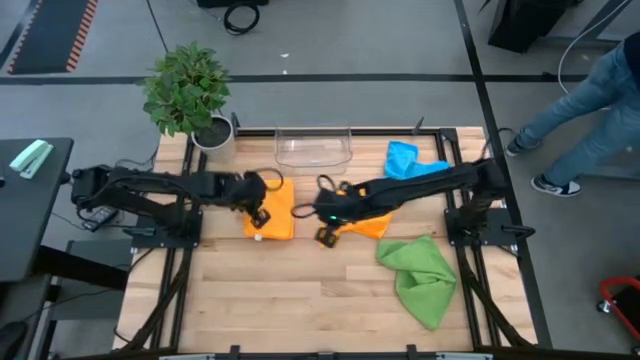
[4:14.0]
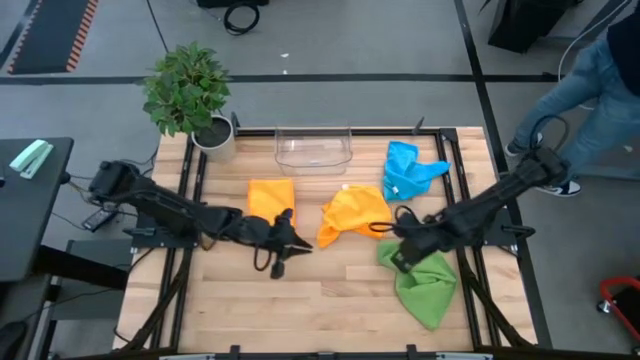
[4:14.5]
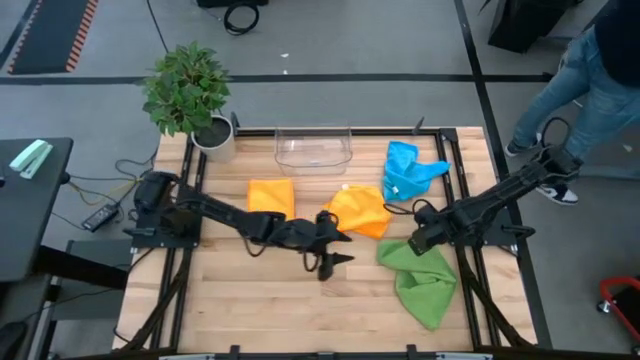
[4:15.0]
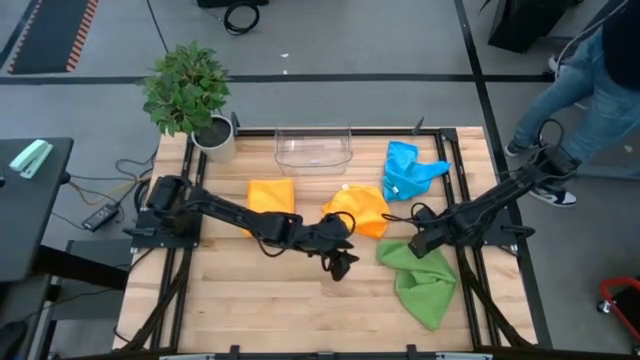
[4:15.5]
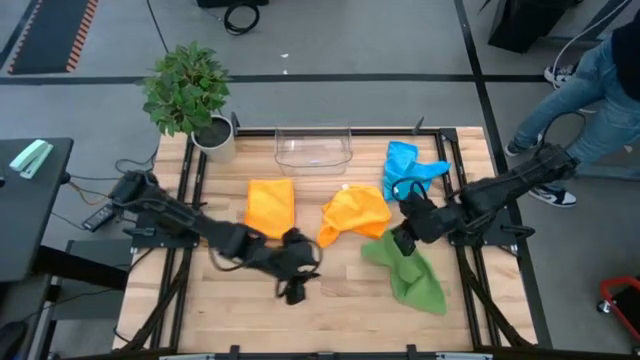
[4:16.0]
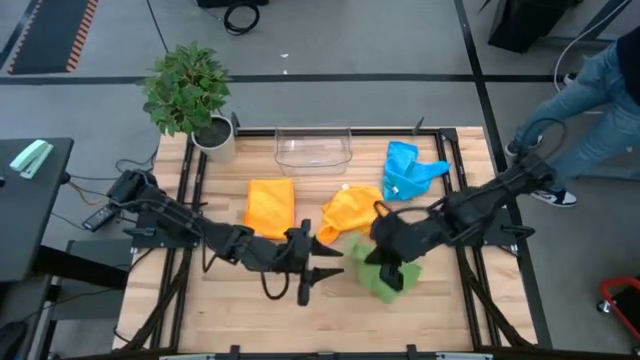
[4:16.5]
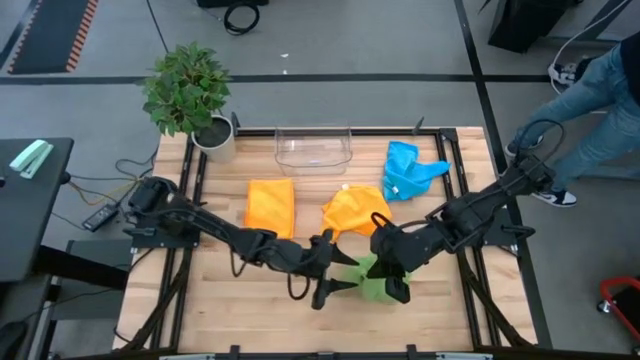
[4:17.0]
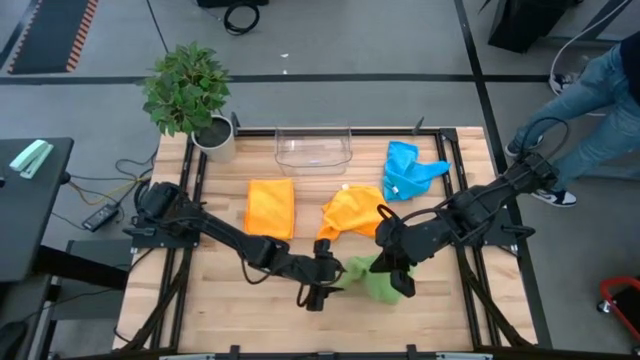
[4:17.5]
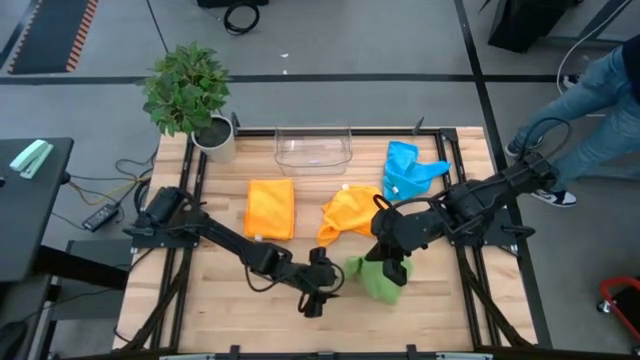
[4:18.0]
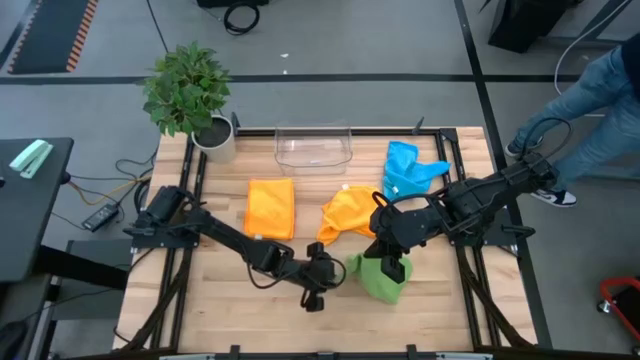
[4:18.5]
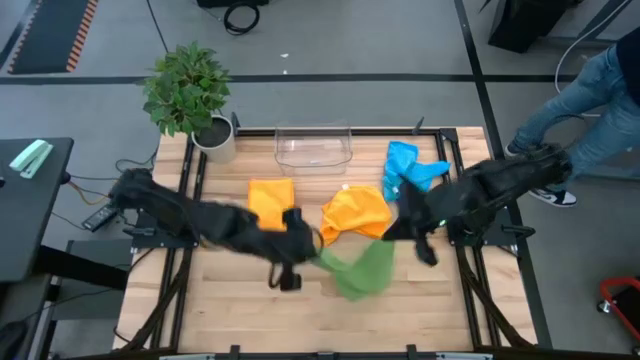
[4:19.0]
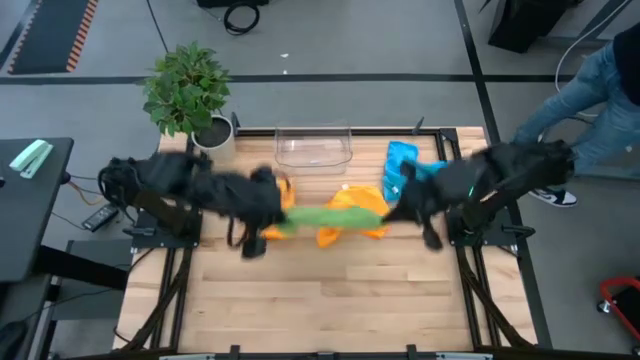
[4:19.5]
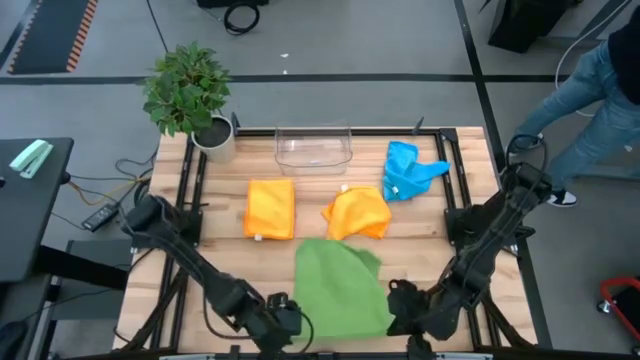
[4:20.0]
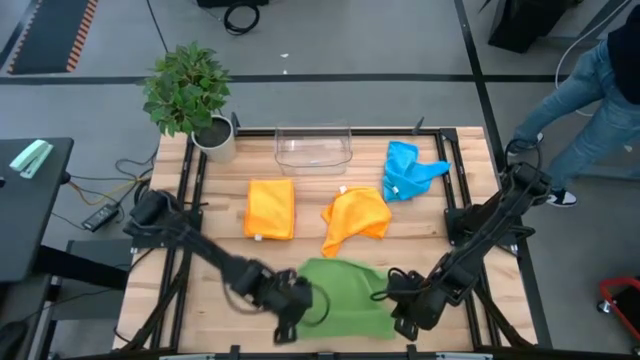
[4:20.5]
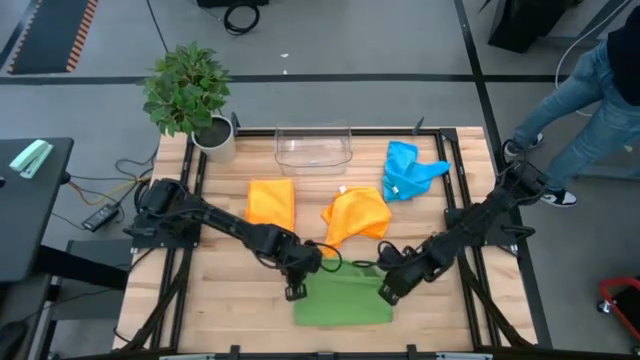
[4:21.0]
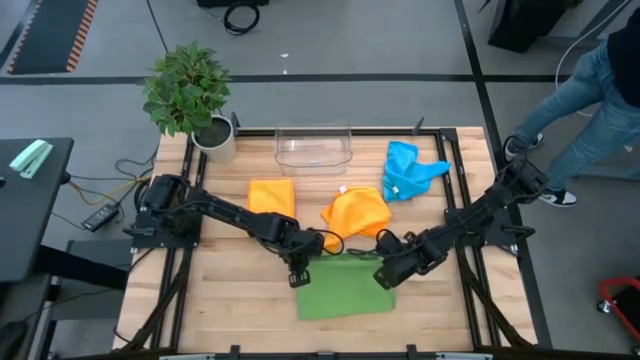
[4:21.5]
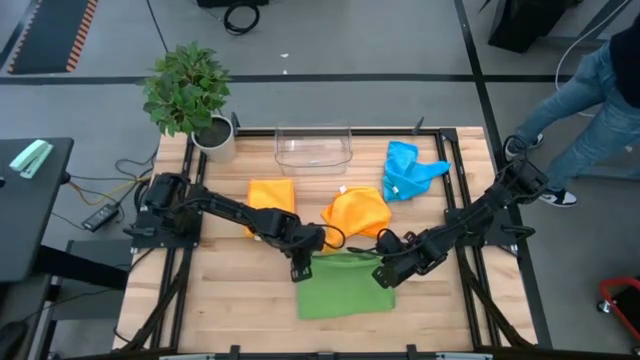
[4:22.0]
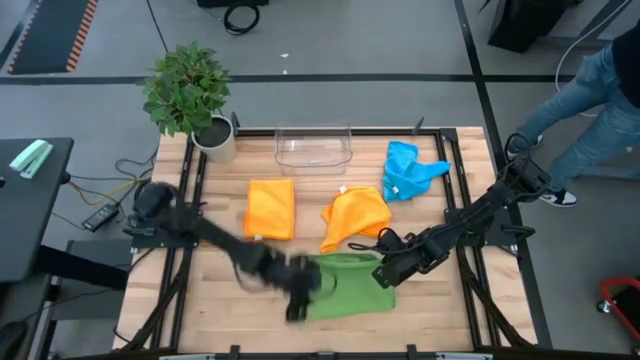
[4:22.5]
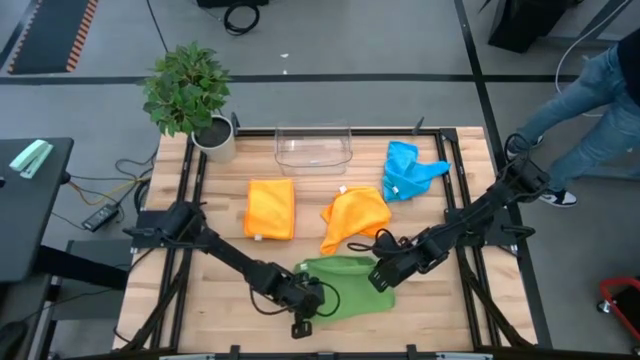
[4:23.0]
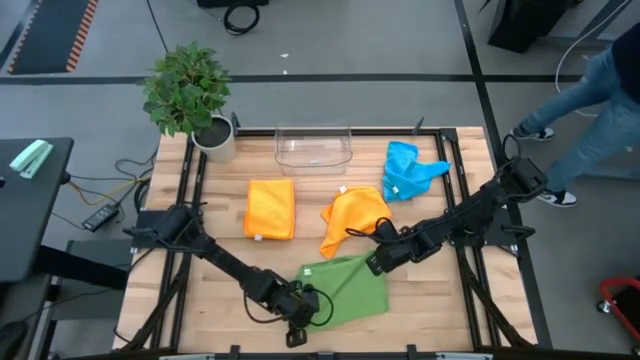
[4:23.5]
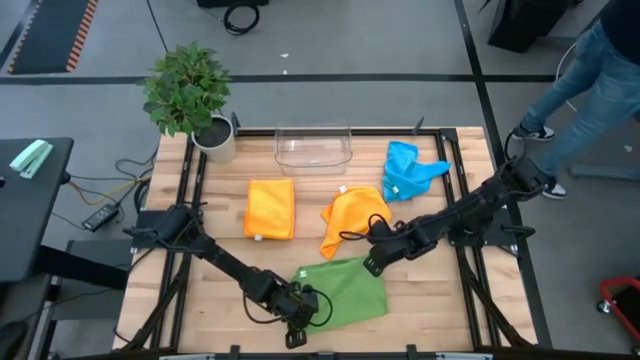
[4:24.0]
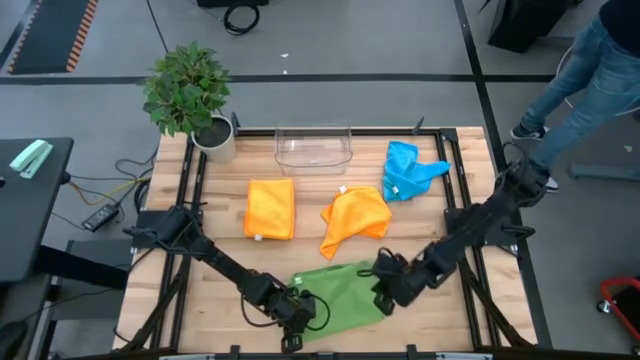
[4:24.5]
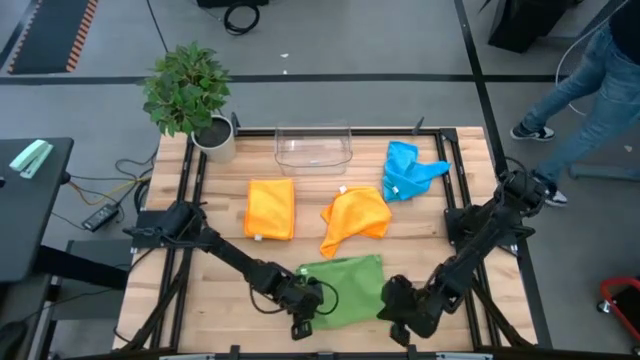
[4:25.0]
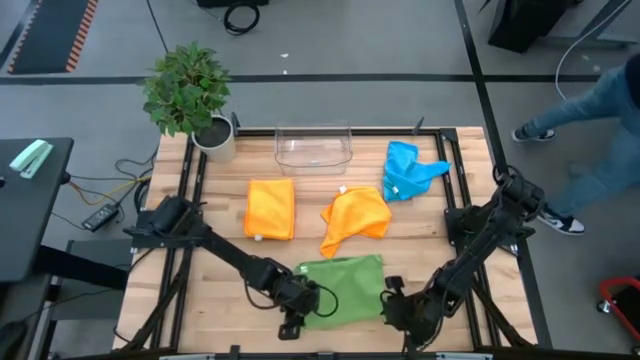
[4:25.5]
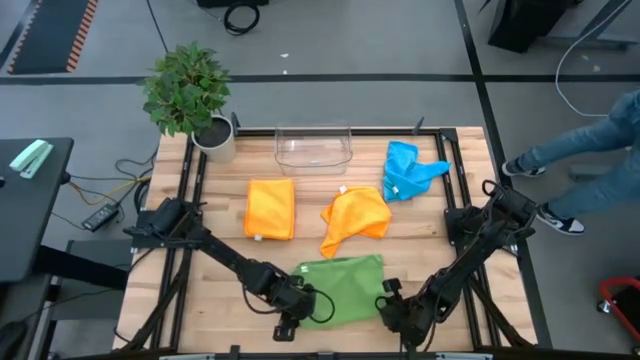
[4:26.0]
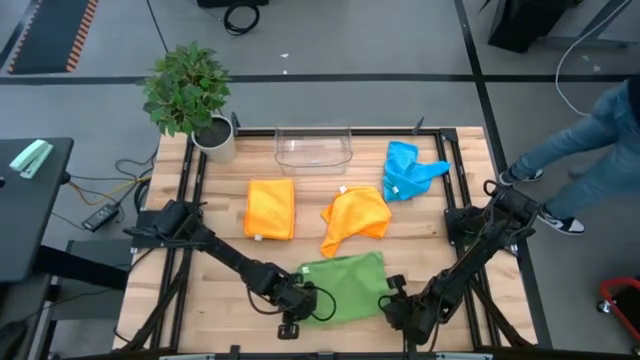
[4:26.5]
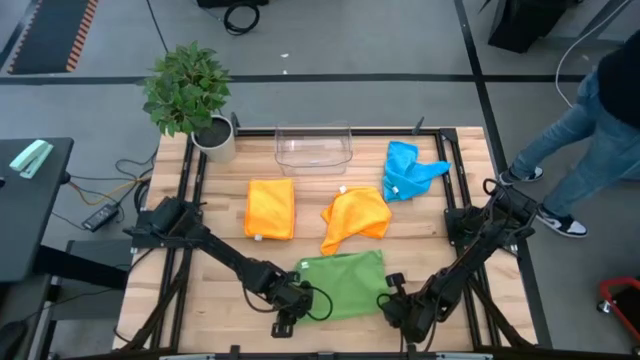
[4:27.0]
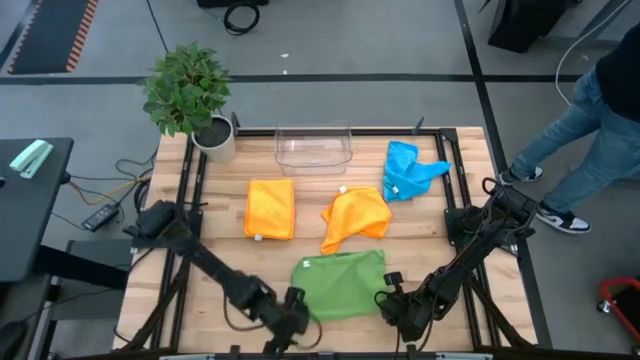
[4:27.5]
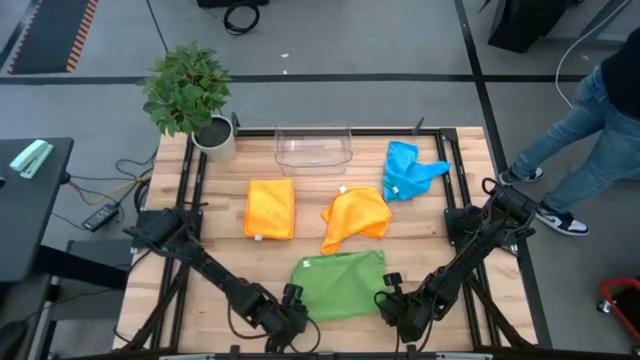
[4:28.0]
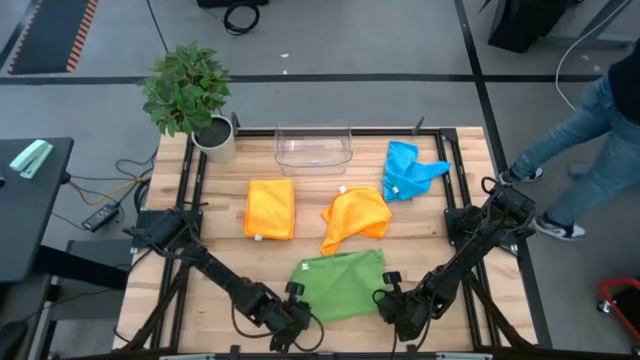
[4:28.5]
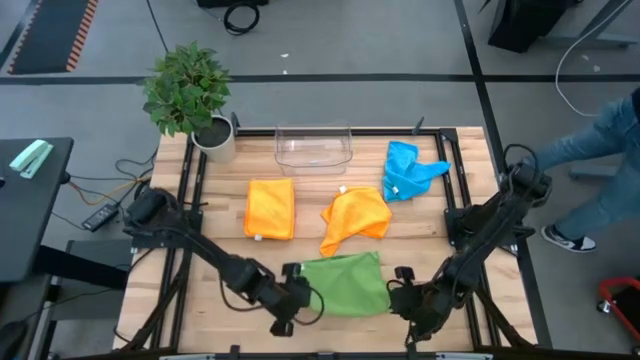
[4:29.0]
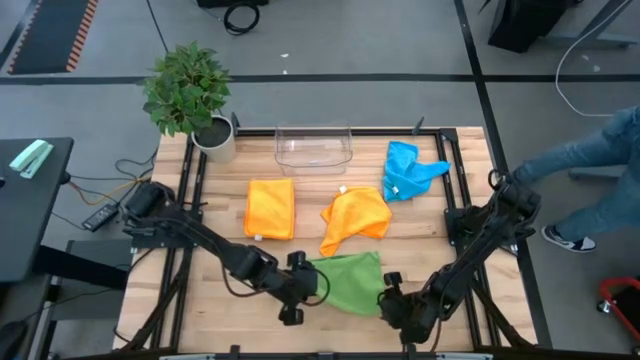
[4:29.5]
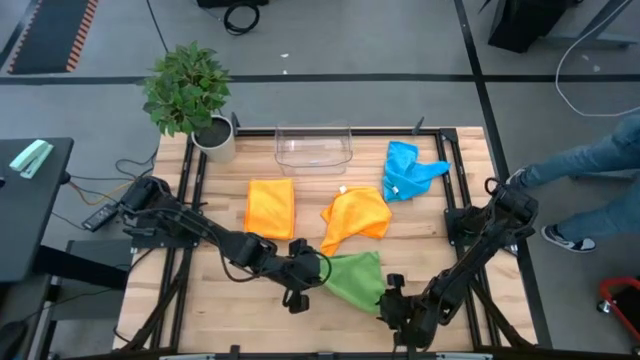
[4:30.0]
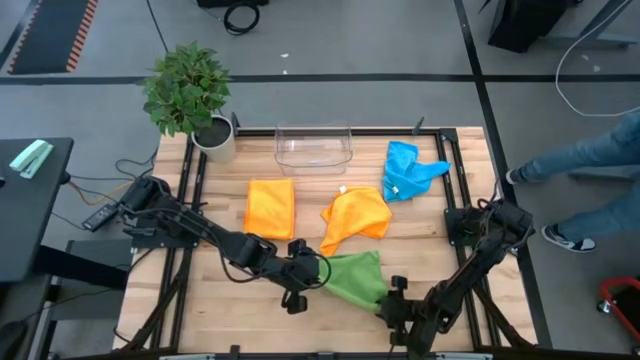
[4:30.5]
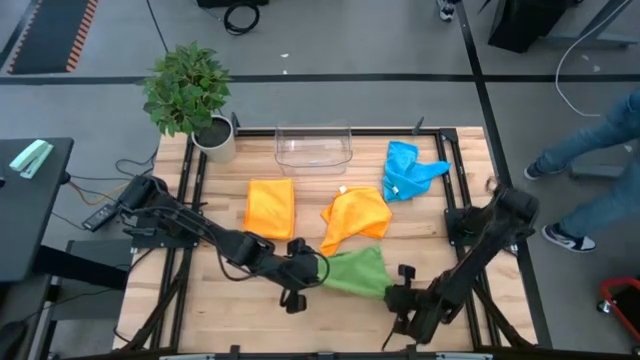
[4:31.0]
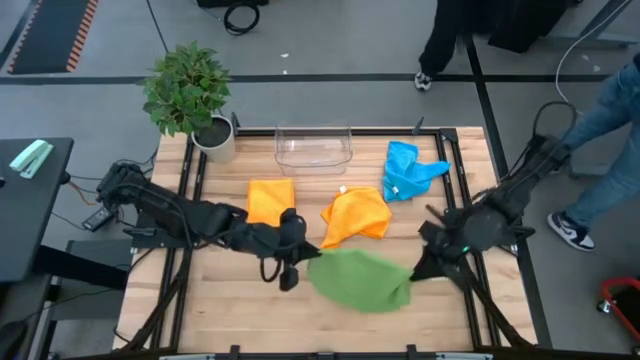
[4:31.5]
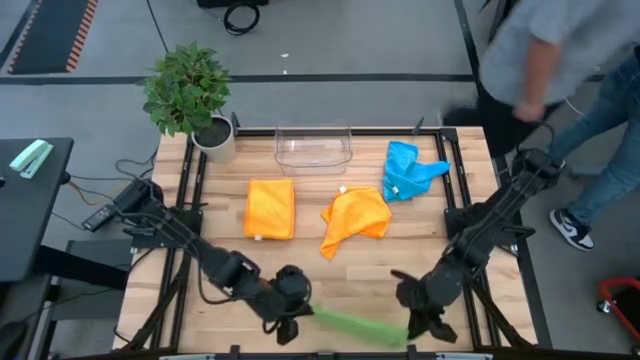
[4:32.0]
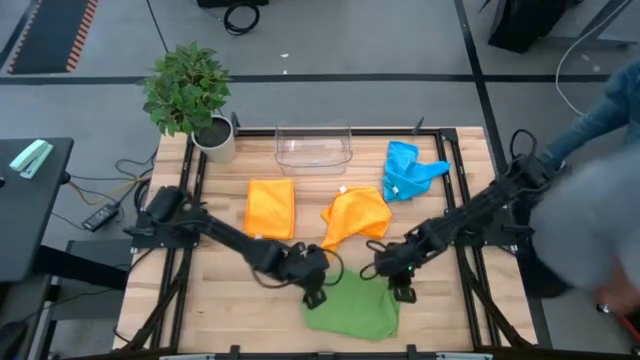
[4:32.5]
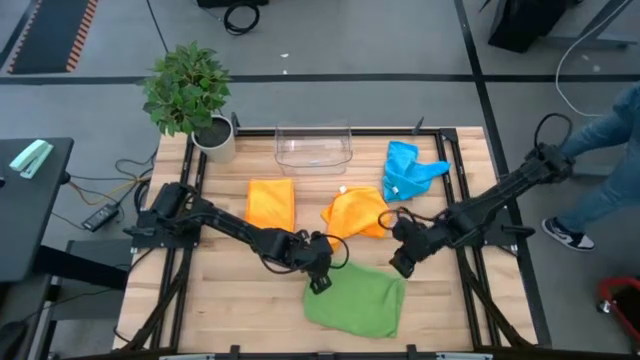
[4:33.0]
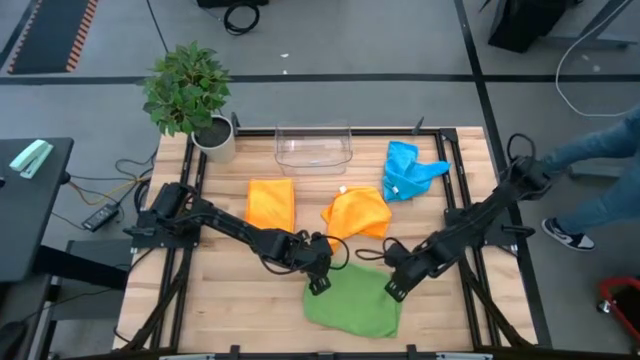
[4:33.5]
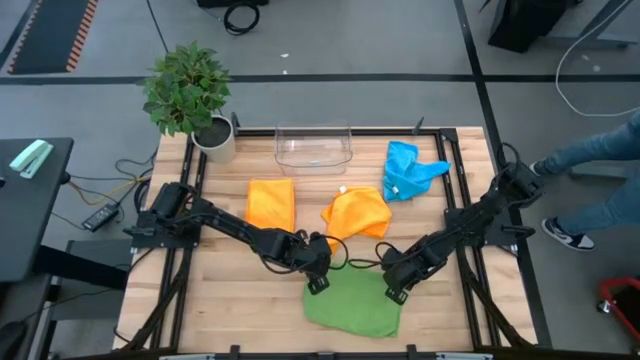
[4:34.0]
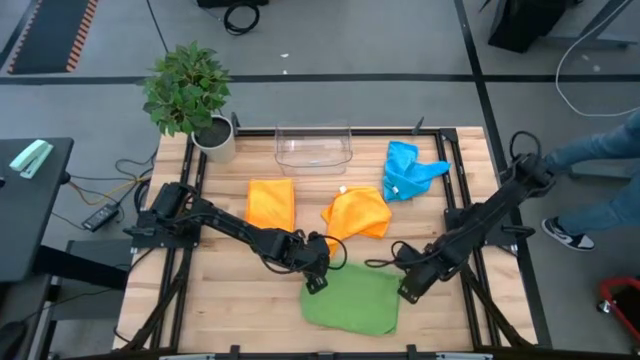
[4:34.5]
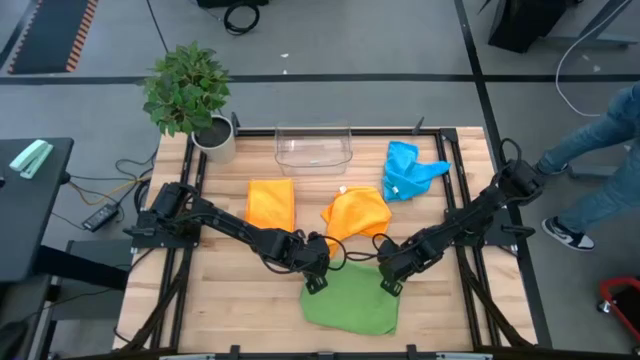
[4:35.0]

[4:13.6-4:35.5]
Task: Fold microfiber towels
Fold the green microfiber cloth
